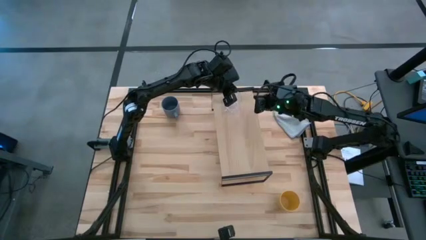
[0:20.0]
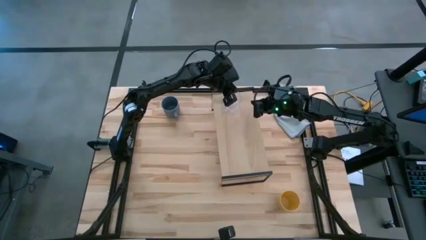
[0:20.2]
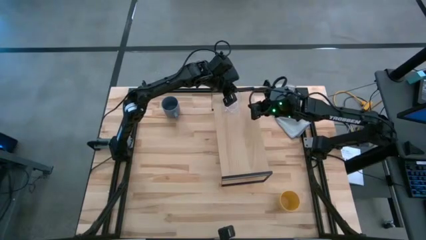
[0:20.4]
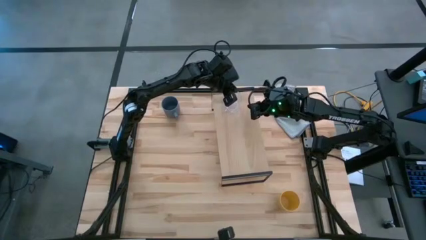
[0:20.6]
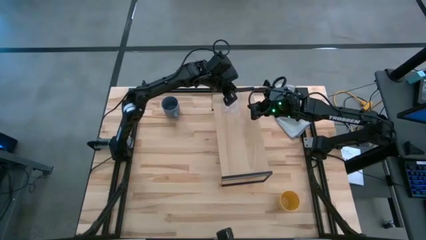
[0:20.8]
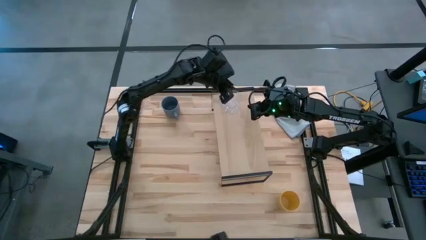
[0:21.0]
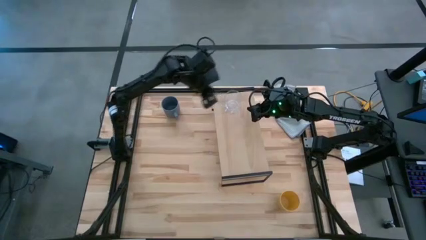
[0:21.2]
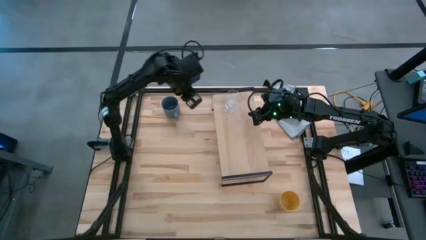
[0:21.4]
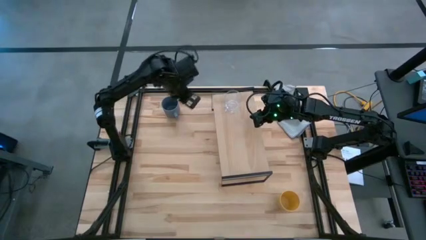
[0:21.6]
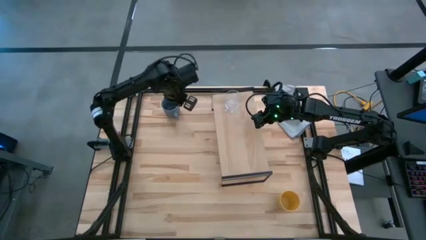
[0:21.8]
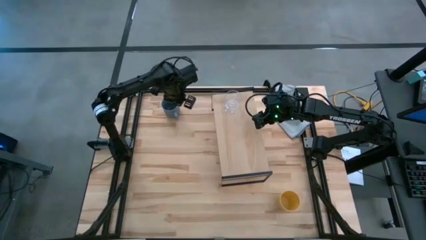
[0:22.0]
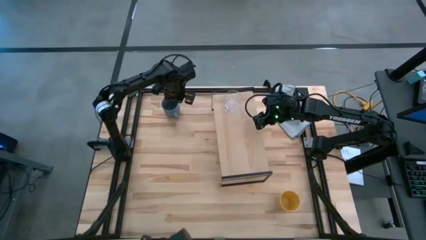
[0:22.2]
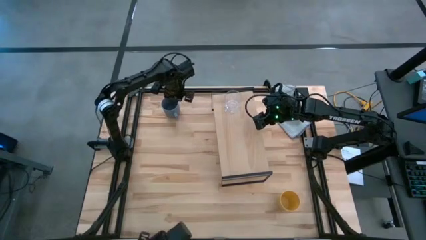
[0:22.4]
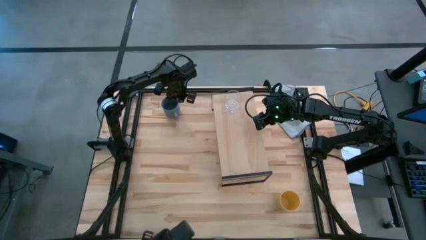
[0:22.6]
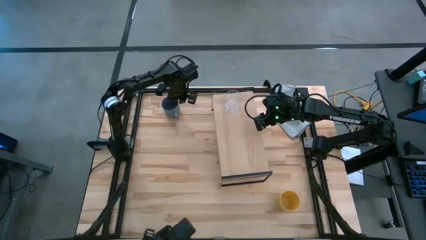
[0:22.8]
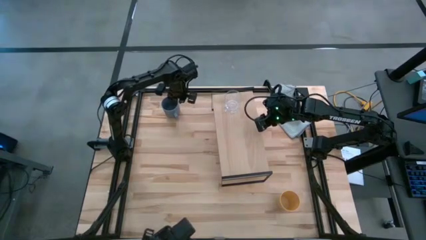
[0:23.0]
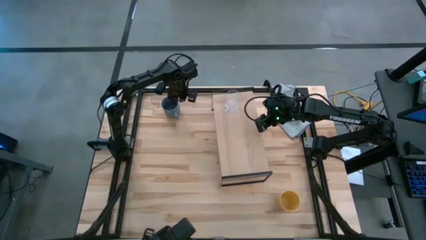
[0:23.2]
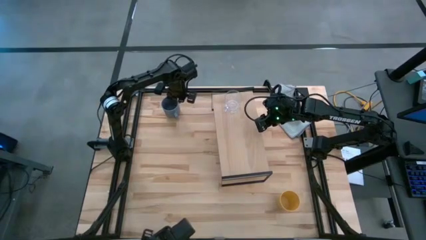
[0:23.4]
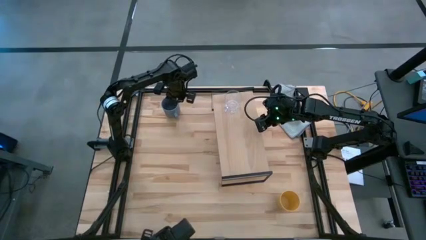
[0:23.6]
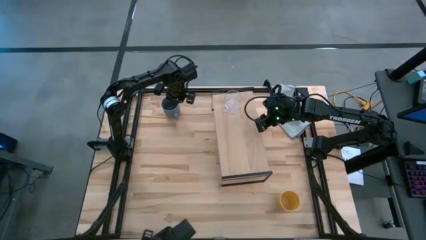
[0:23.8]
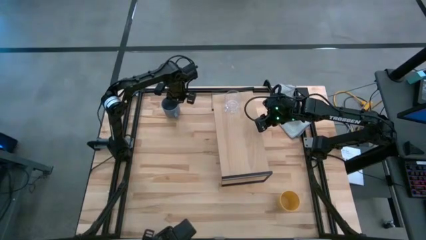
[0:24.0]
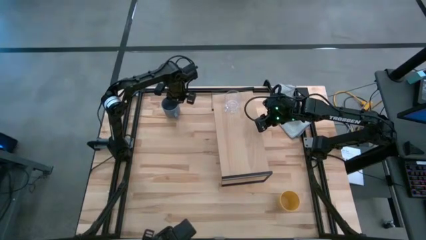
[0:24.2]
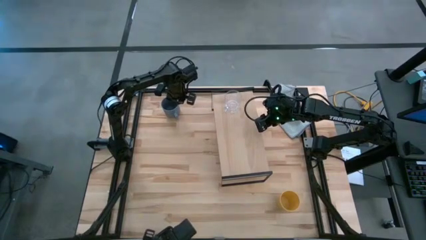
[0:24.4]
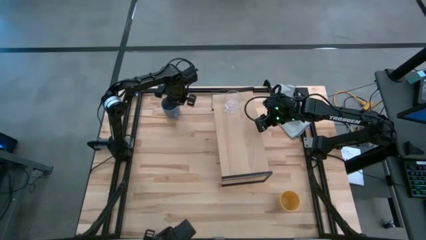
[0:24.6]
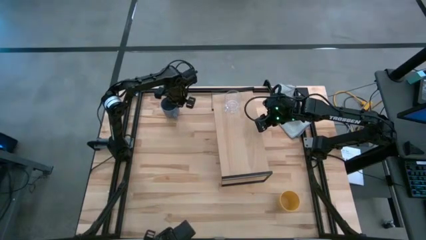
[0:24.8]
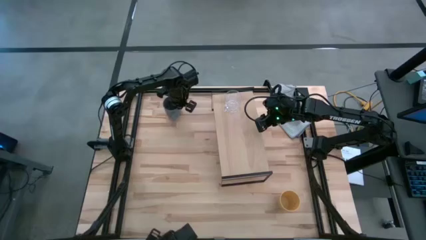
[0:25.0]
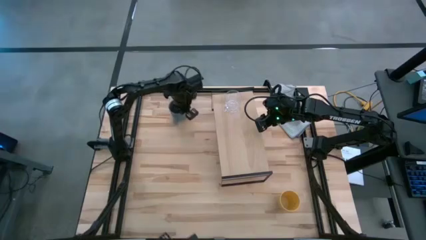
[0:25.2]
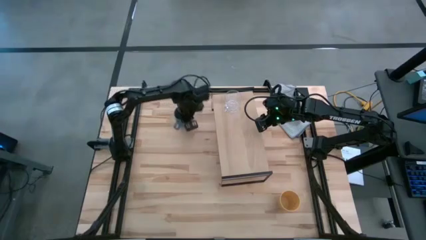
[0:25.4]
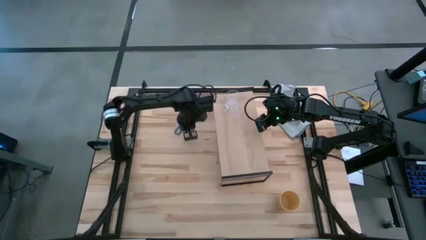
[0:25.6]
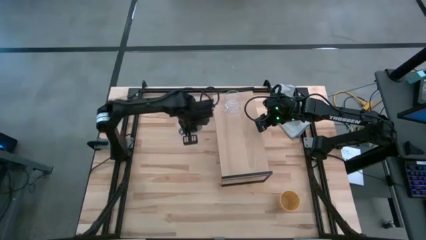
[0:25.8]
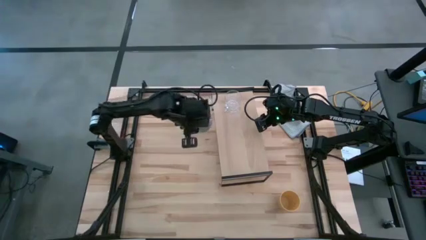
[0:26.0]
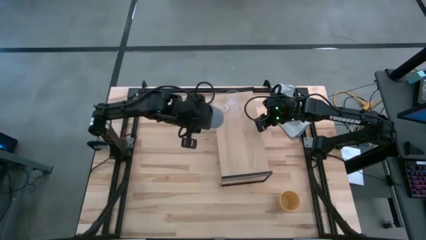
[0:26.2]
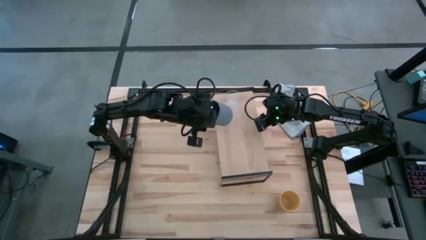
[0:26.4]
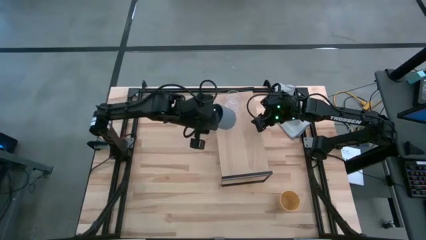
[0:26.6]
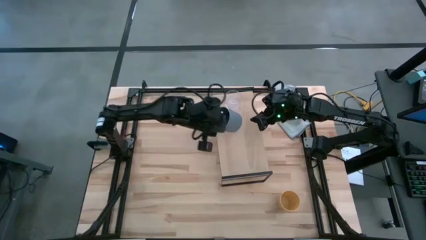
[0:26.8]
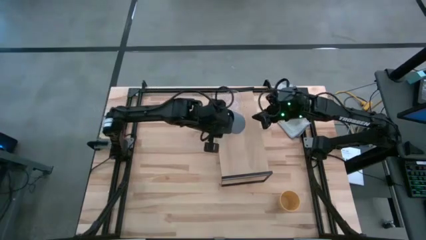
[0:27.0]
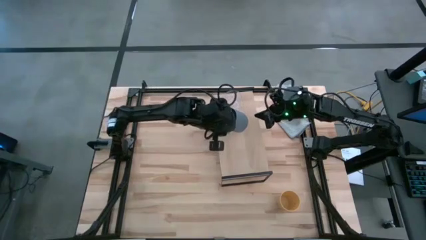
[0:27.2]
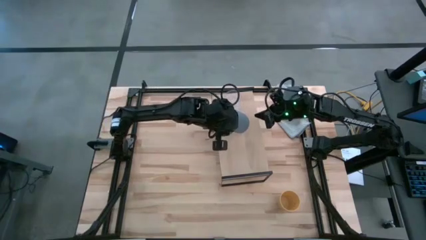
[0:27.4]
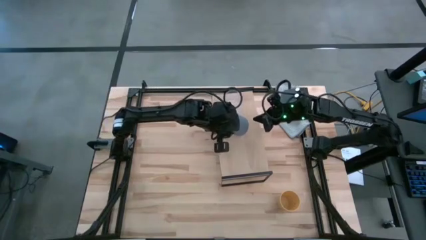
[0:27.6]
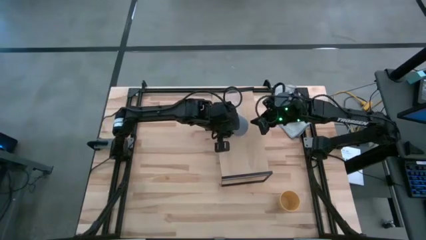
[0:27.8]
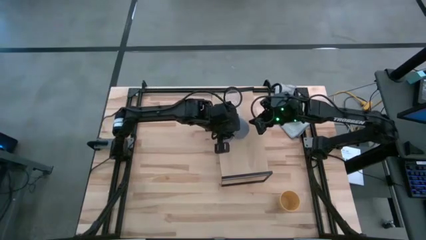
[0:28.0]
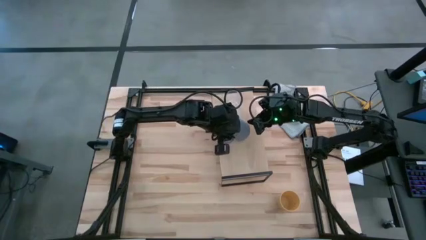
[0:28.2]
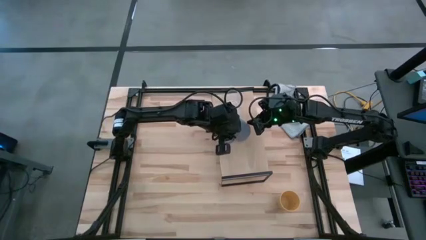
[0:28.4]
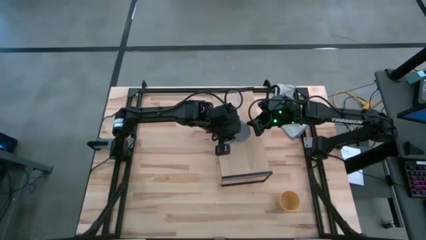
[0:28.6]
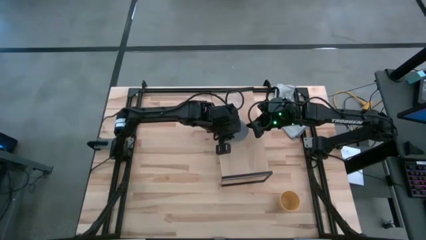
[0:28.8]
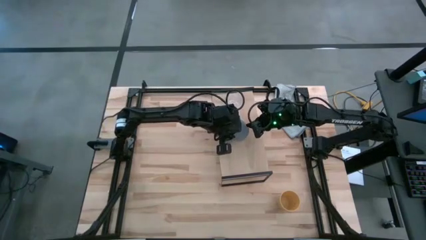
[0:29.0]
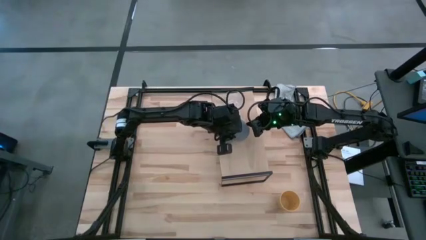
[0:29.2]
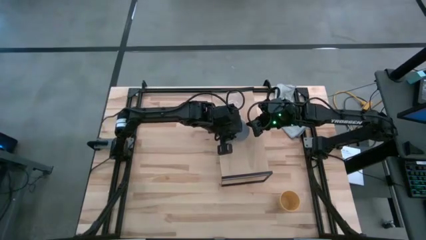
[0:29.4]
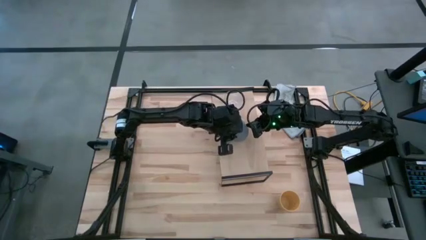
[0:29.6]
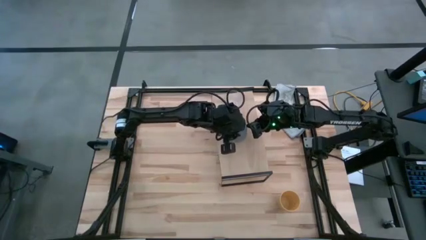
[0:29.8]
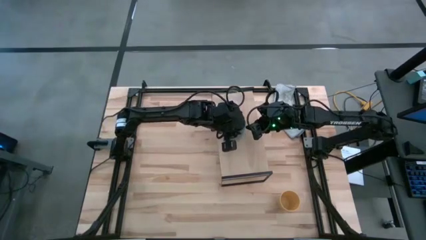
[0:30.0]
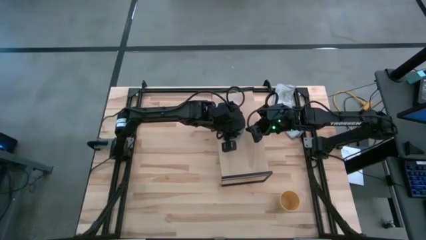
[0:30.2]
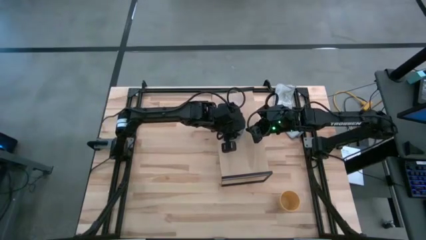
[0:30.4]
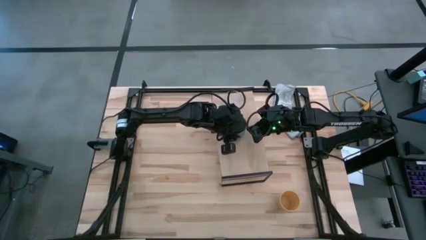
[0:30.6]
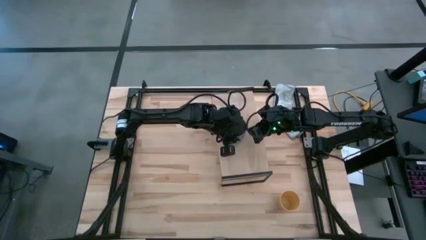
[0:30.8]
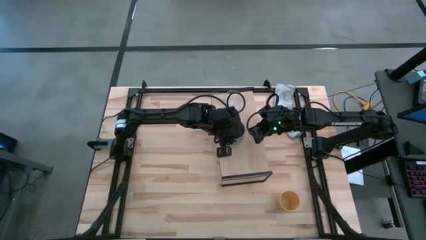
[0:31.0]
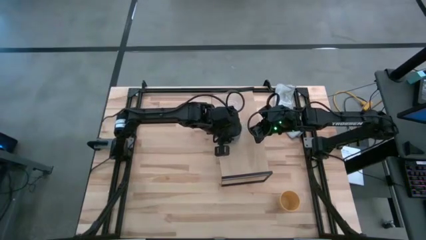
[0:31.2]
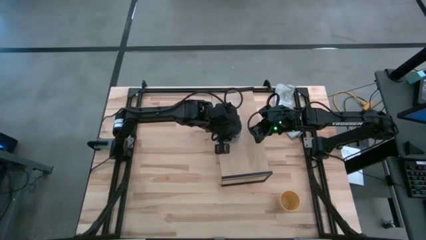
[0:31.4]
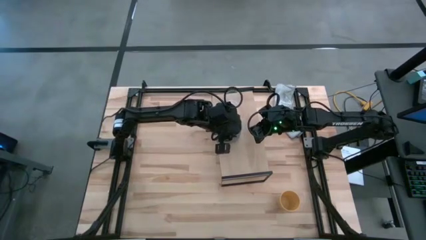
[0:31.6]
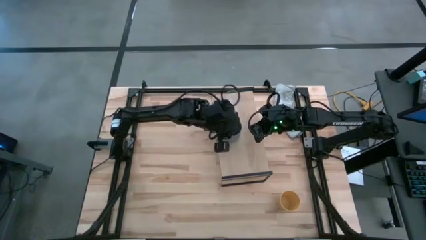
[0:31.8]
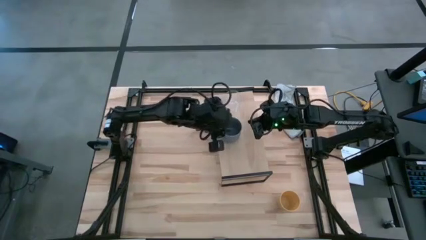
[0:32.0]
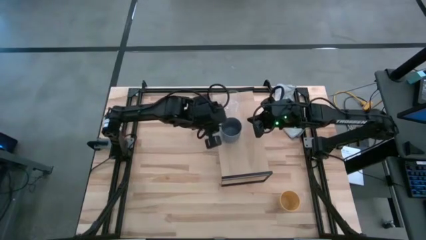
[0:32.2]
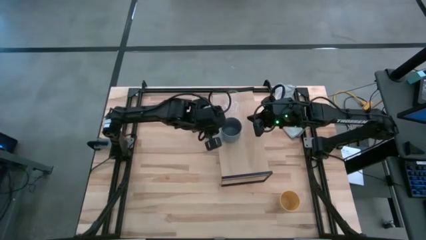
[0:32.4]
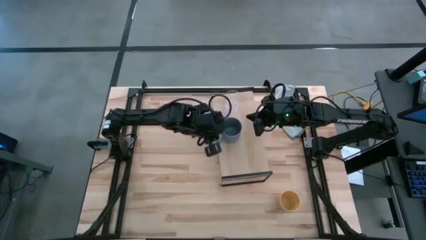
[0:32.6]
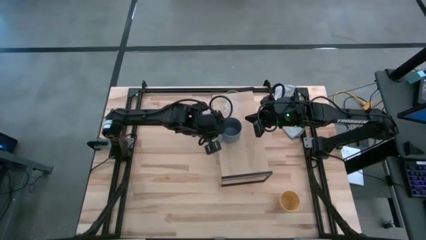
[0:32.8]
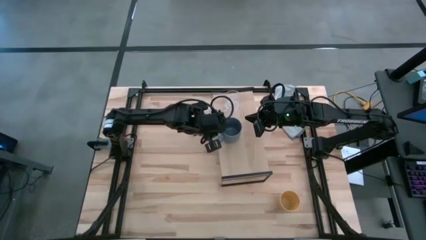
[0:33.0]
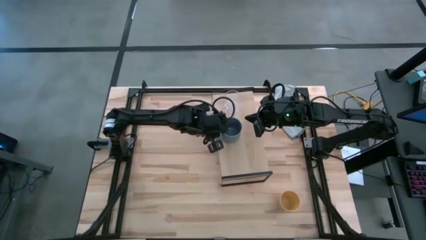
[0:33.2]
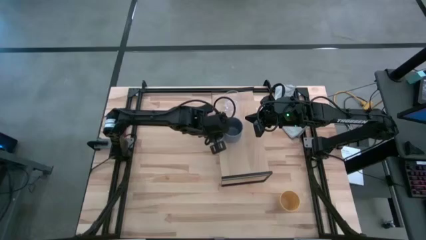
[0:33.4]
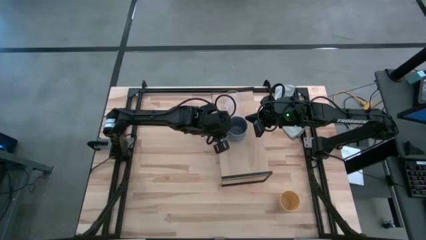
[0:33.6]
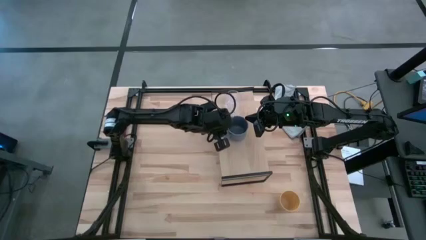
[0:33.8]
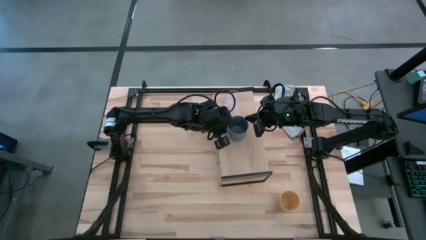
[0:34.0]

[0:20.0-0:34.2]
Task: Stack small to large cups/mugs on shelf
Put the blue mug on the shelf

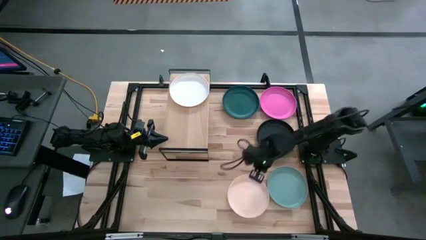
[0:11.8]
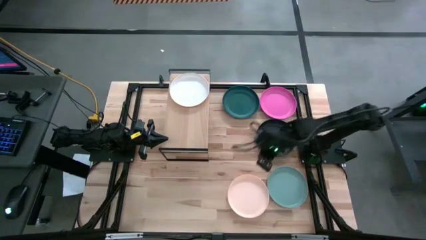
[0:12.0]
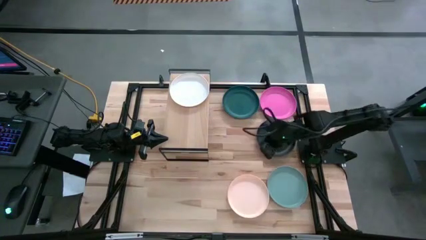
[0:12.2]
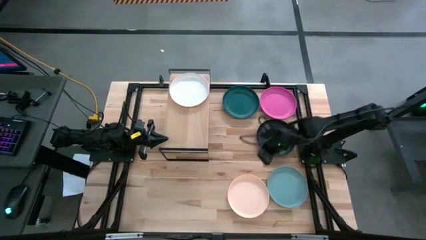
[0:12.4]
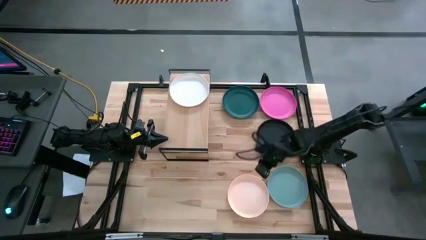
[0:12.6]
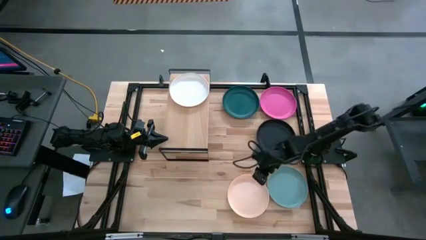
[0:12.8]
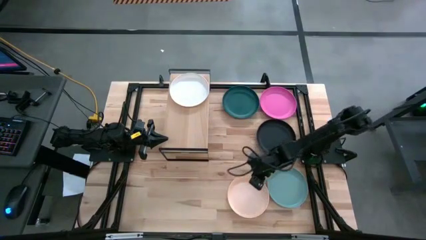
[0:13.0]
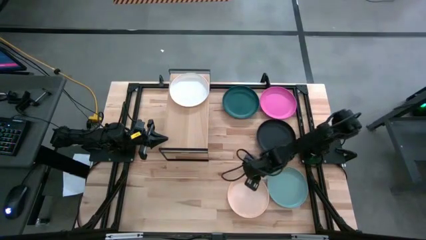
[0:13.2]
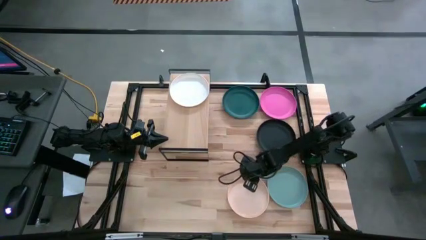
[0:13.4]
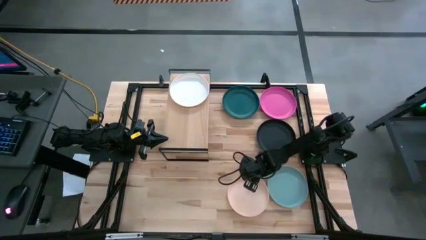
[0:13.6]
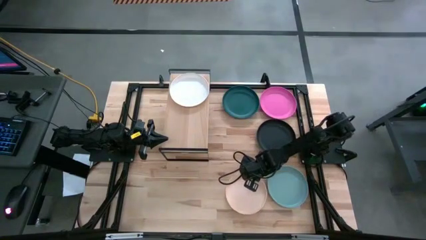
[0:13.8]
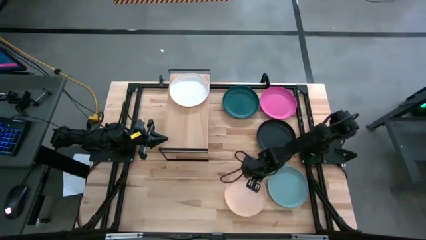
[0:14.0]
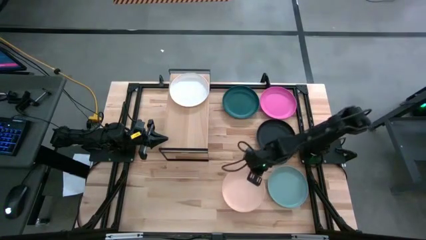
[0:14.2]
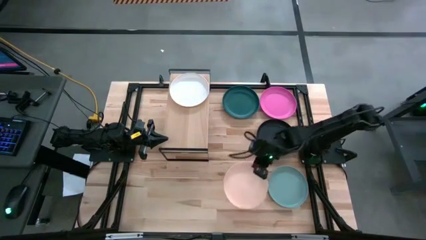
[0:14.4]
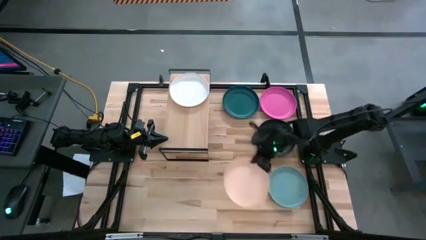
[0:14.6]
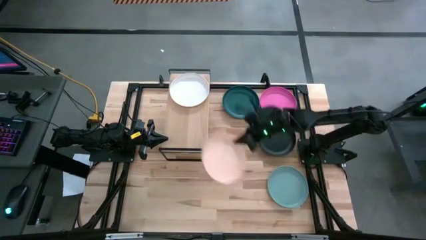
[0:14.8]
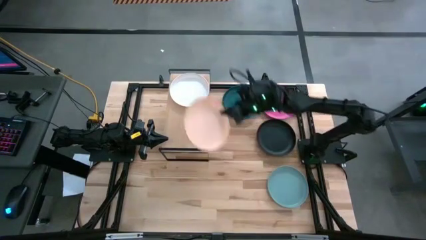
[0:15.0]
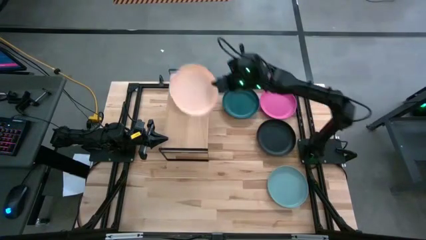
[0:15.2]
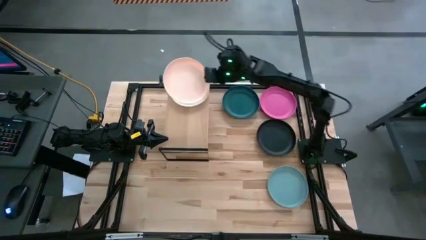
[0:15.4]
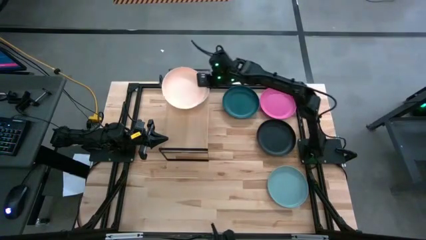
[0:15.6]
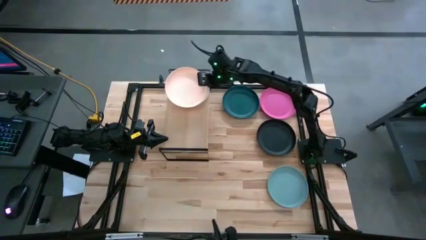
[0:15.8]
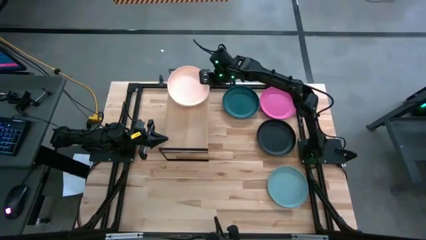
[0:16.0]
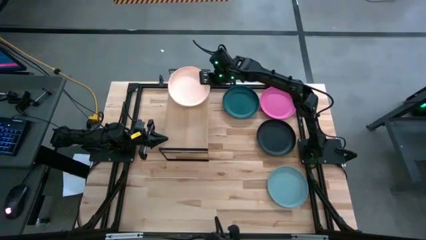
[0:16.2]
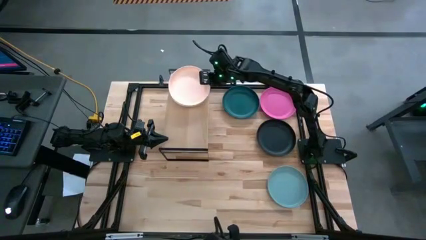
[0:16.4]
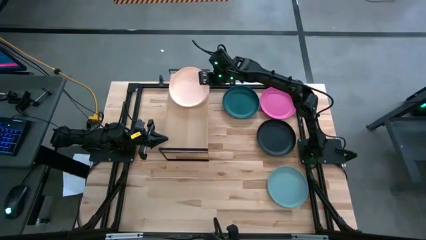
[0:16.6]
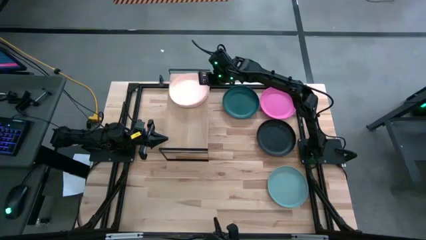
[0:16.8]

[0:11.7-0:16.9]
Task: Place and stack plates onto a shelf
Stack the light orange plate on top of the white plate on the shelf
